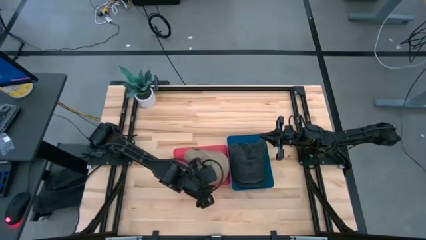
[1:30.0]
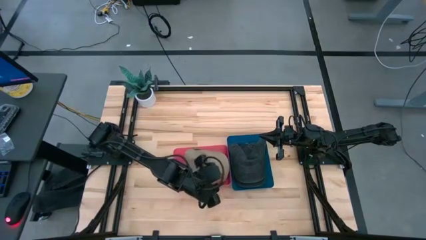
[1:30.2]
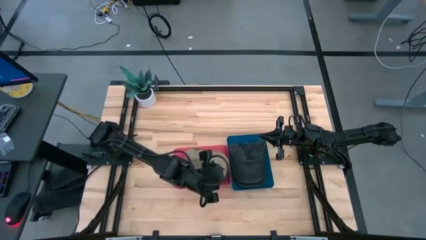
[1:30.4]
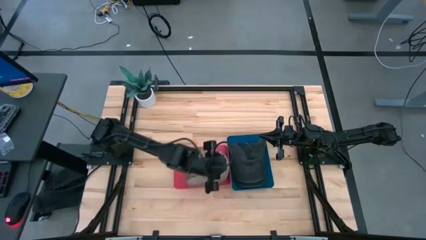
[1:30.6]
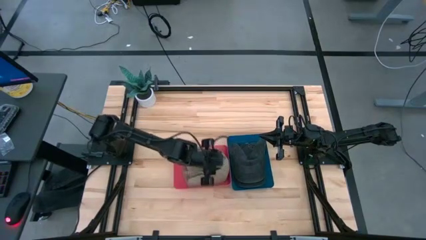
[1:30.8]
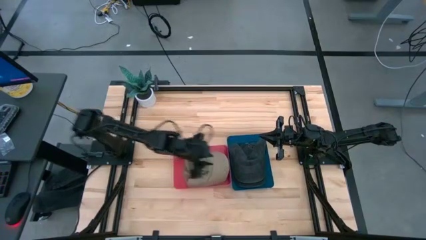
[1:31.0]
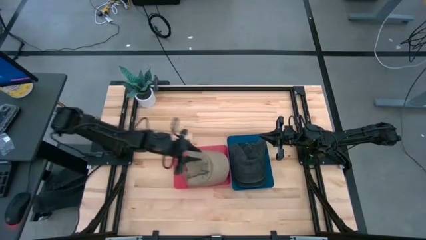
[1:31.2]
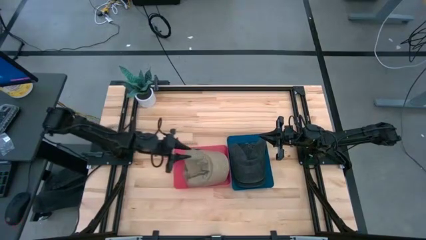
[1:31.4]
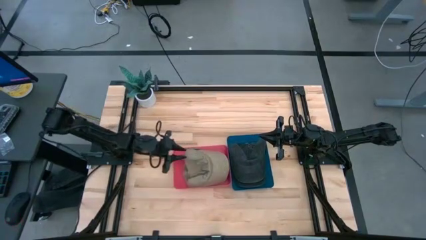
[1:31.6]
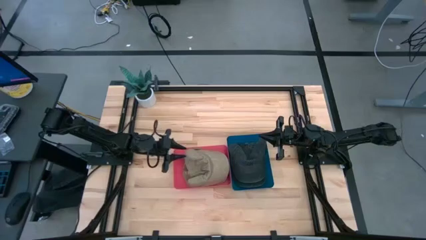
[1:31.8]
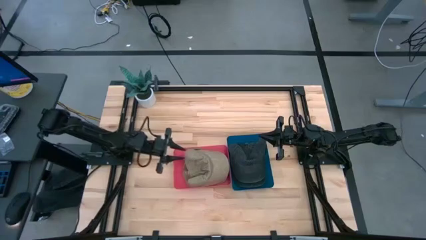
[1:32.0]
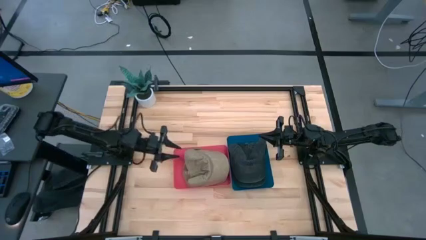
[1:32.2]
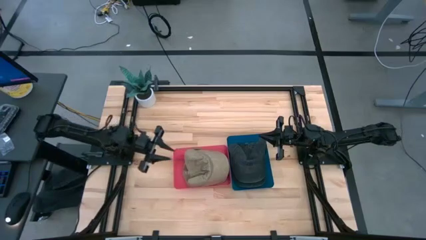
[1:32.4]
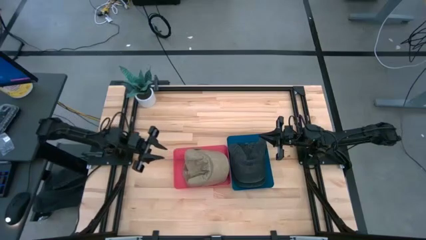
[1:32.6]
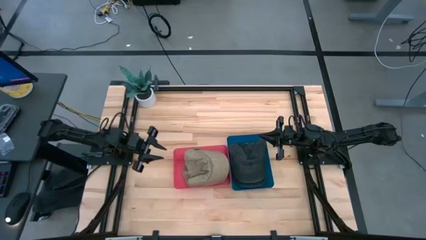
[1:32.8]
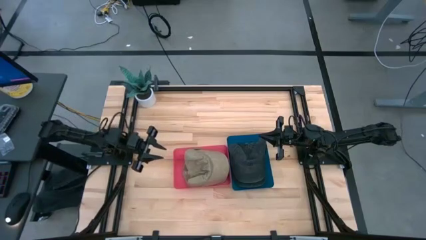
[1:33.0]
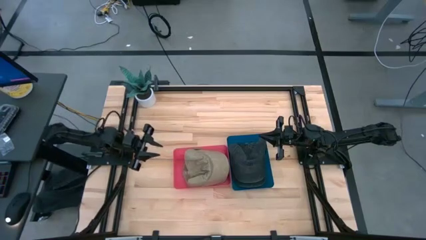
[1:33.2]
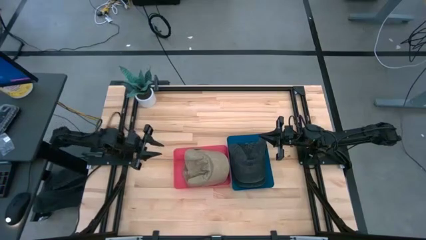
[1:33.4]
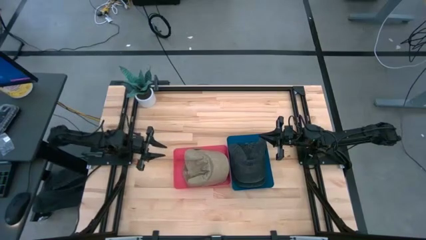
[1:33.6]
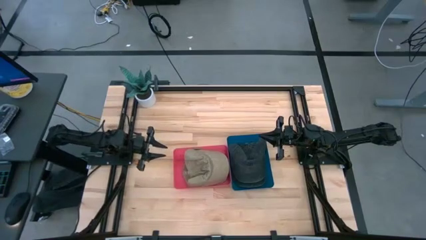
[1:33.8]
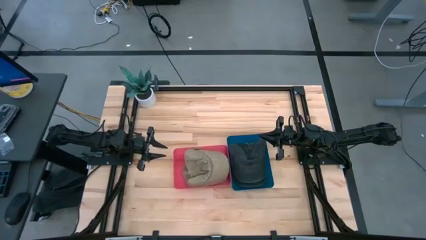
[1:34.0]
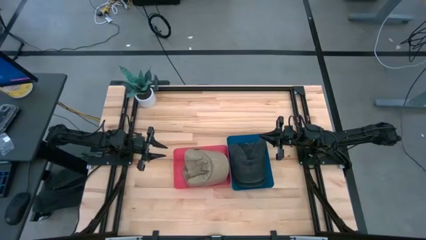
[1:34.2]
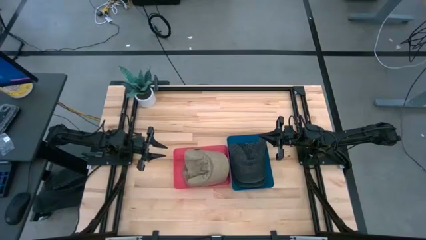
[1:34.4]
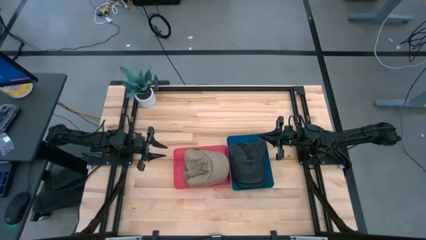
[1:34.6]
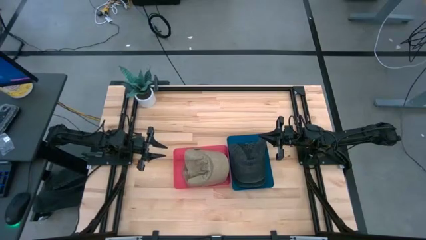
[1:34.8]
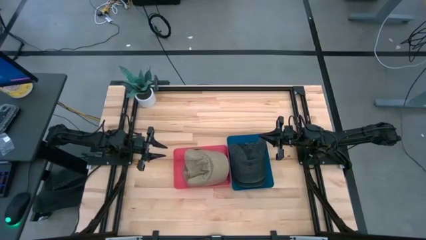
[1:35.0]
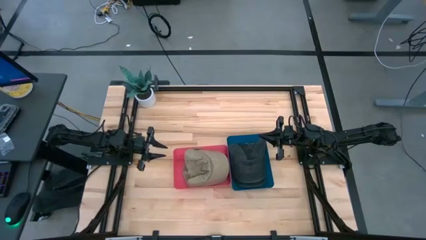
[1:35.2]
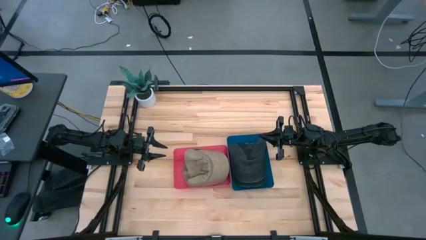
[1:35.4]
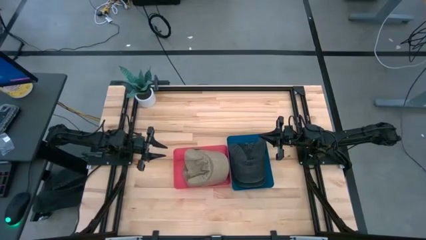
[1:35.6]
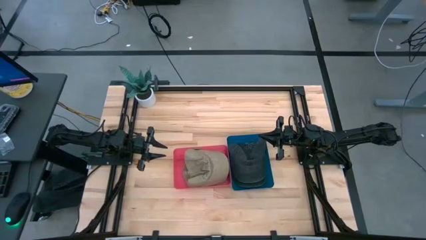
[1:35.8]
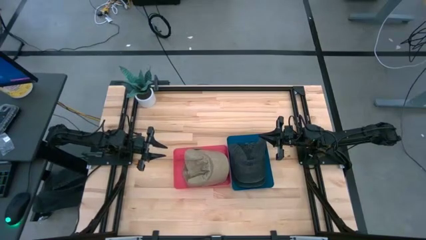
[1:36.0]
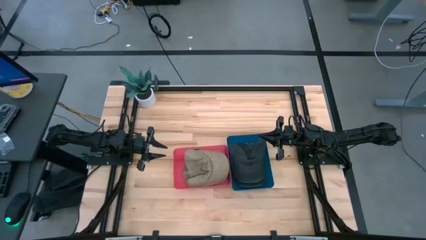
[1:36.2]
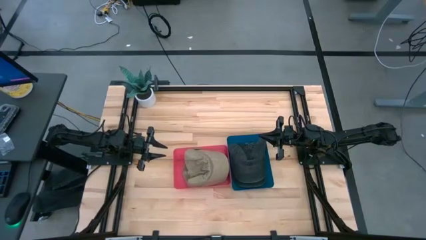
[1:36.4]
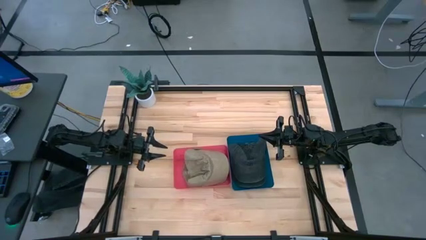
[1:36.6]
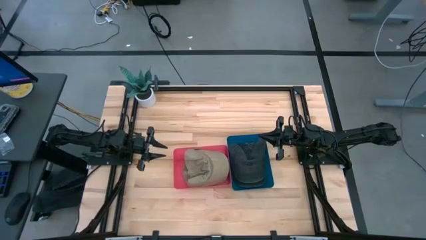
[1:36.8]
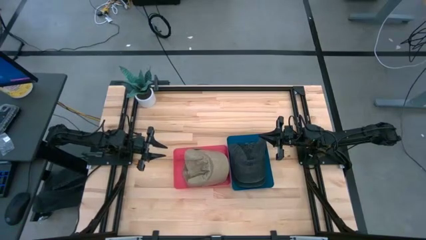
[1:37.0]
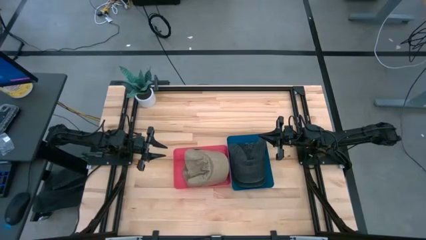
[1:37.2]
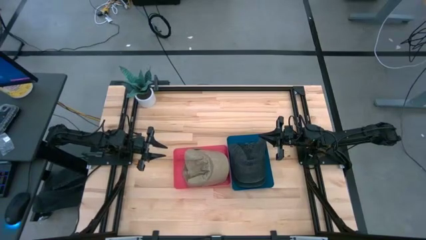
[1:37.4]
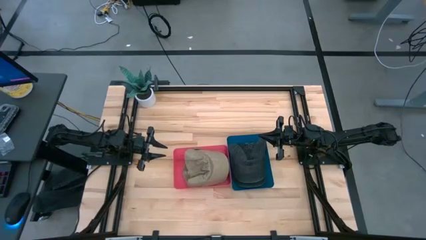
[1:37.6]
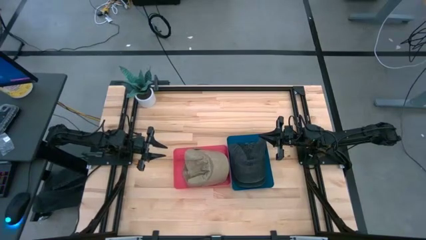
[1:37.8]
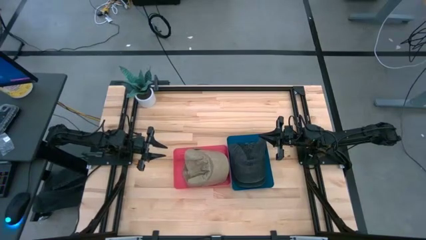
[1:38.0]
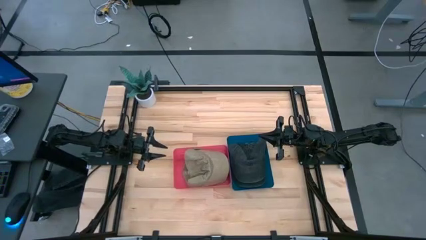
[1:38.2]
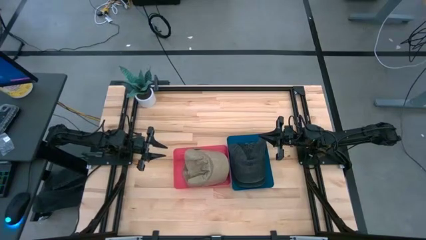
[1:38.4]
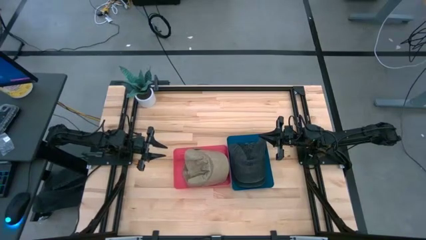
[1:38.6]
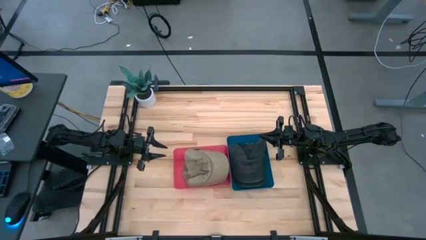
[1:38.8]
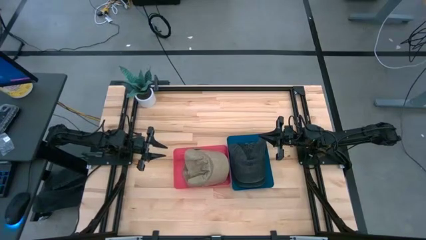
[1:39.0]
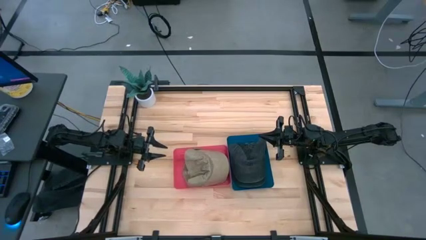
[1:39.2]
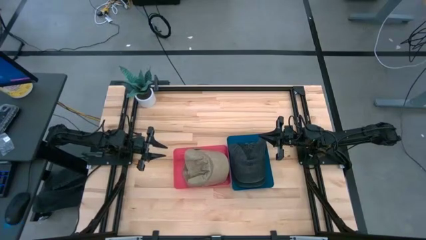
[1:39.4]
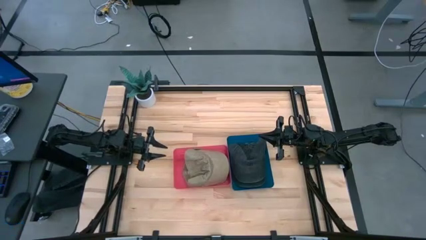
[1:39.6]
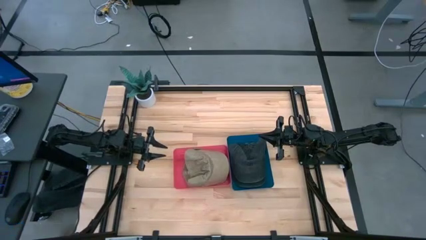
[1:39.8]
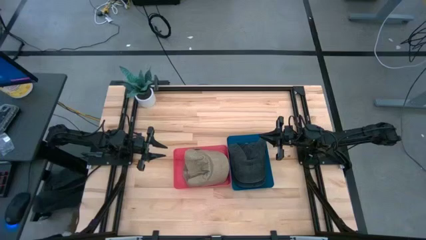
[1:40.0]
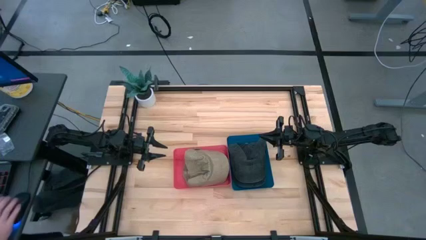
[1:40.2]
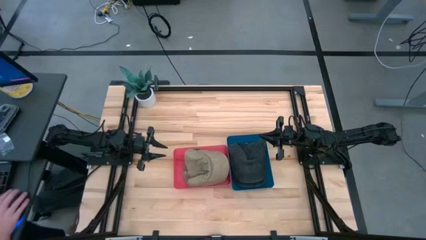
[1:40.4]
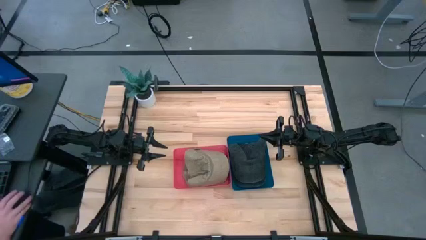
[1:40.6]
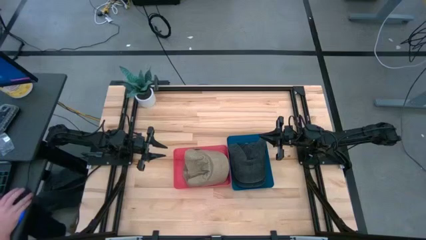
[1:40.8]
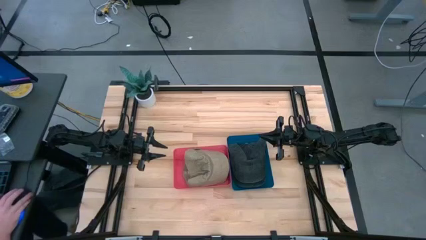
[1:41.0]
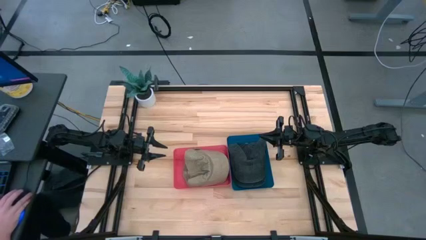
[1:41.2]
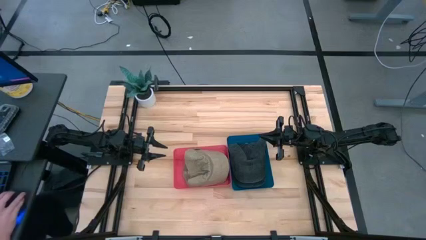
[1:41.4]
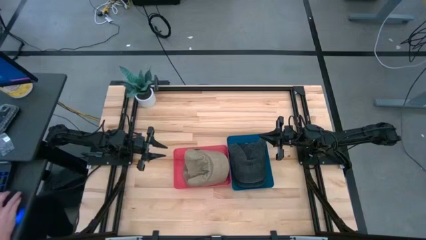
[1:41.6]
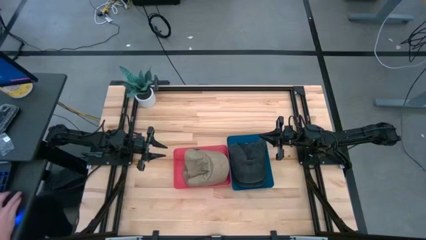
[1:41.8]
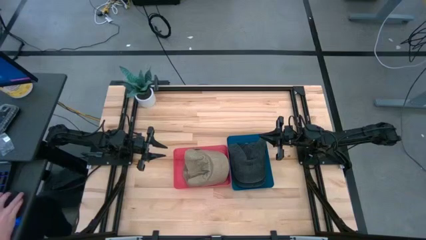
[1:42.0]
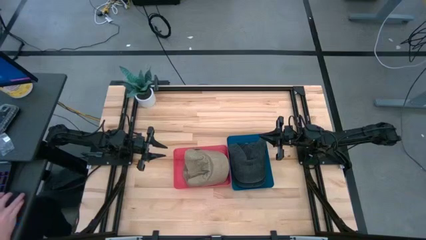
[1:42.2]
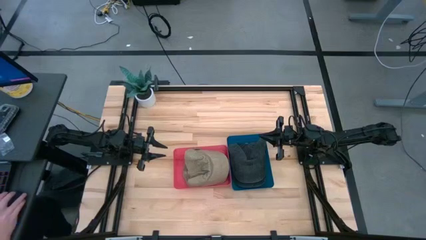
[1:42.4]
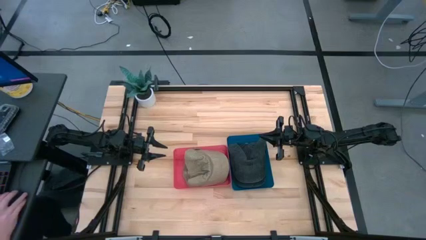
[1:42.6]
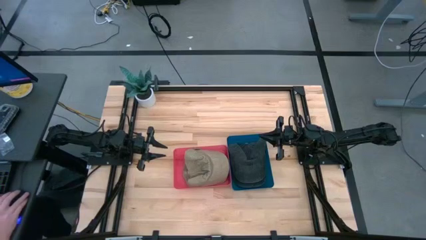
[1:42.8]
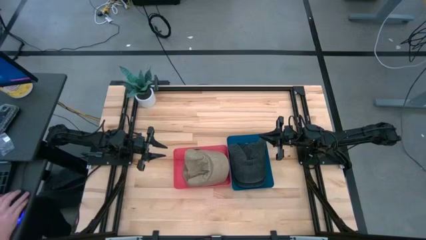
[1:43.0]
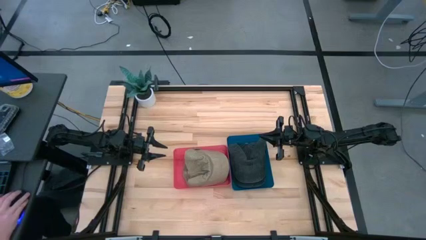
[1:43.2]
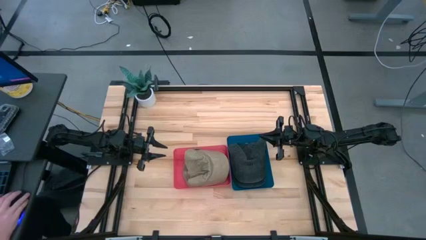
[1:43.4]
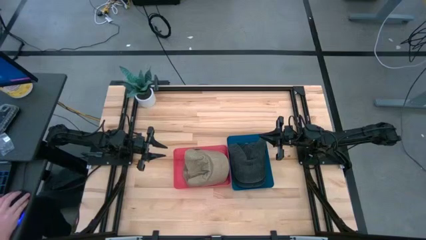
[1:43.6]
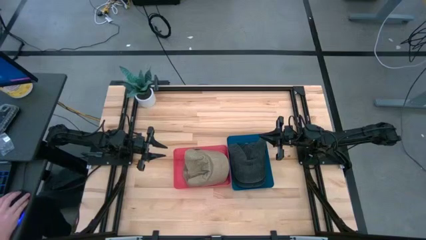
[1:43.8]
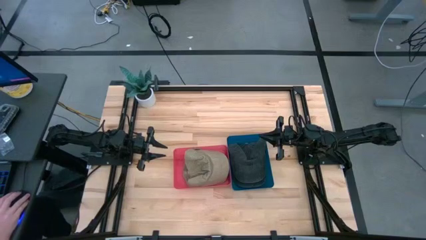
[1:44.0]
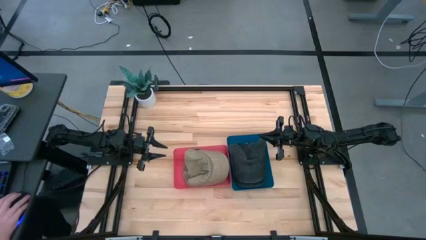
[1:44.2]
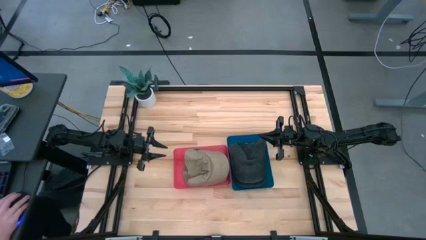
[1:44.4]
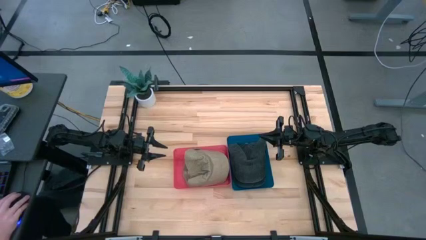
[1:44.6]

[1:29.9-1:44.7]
Task: Pick & Place hat
Return to Home Position
